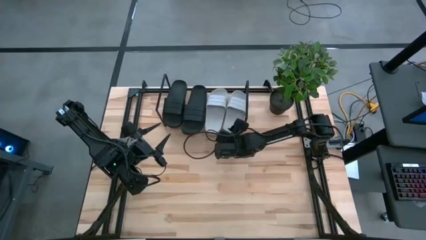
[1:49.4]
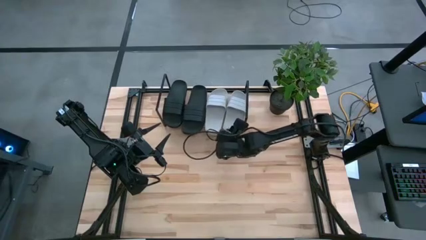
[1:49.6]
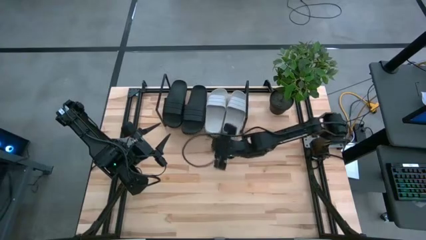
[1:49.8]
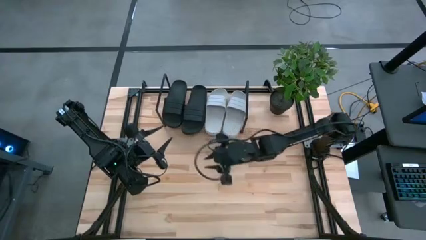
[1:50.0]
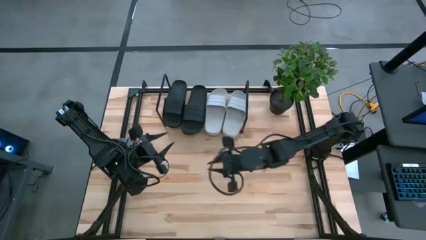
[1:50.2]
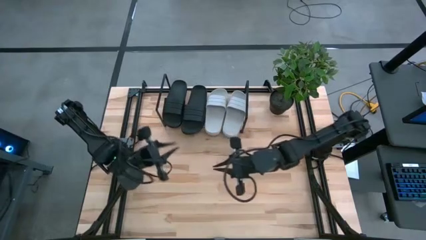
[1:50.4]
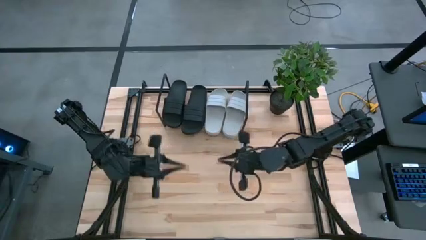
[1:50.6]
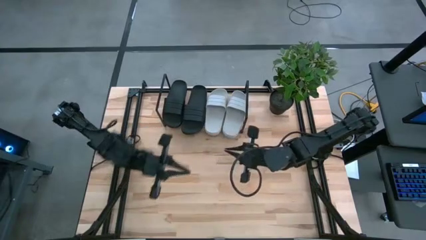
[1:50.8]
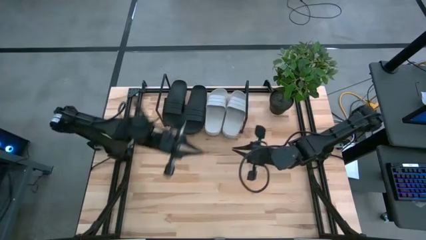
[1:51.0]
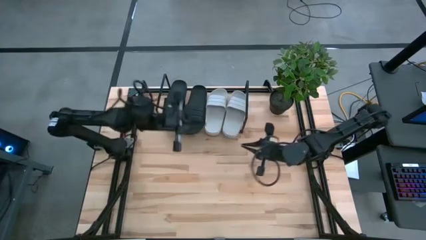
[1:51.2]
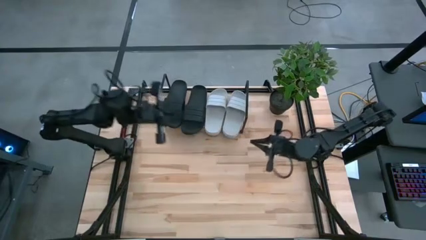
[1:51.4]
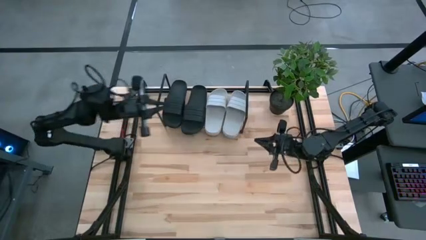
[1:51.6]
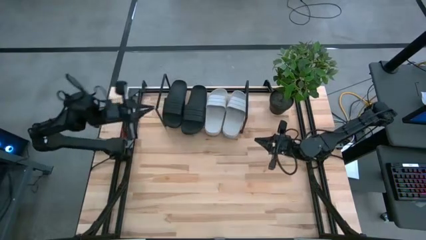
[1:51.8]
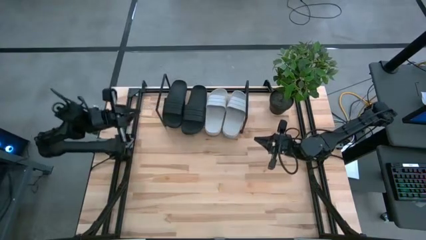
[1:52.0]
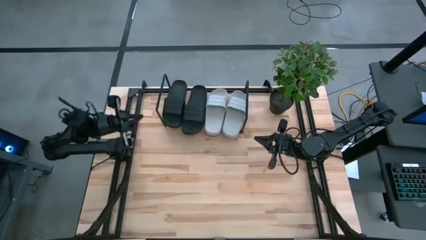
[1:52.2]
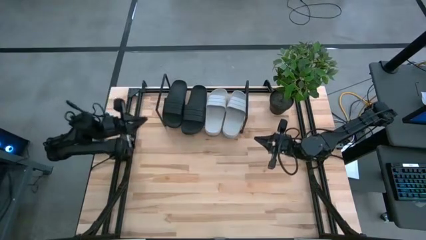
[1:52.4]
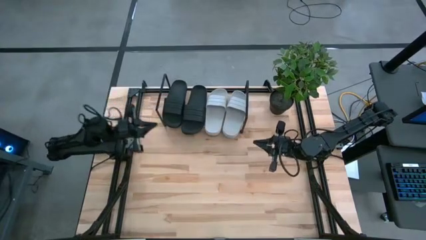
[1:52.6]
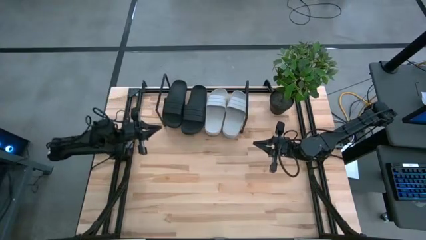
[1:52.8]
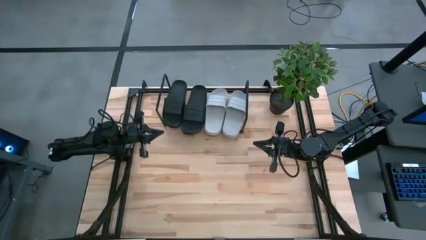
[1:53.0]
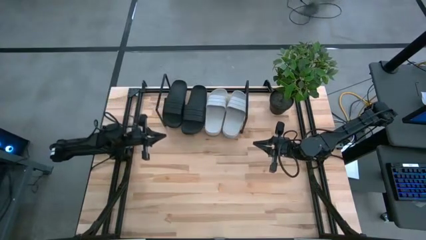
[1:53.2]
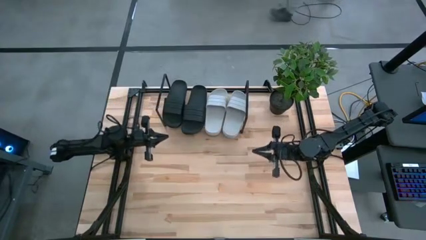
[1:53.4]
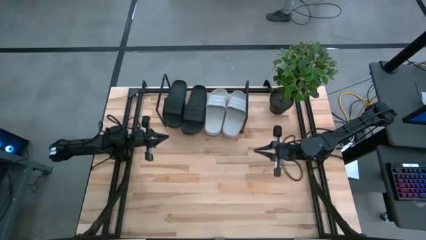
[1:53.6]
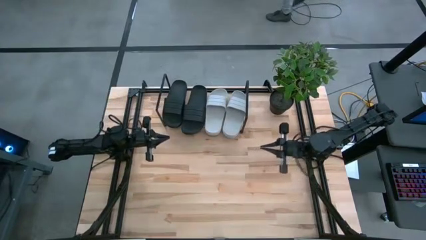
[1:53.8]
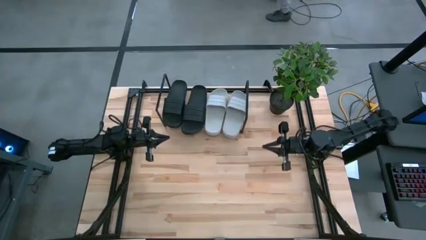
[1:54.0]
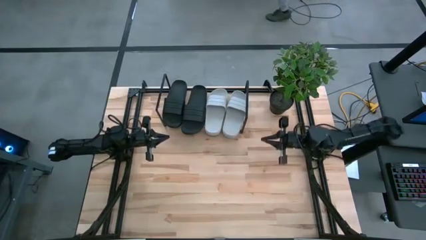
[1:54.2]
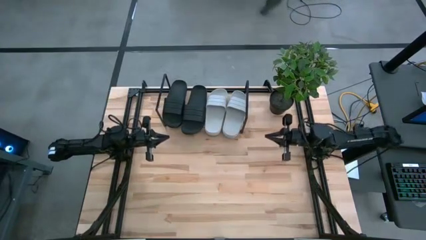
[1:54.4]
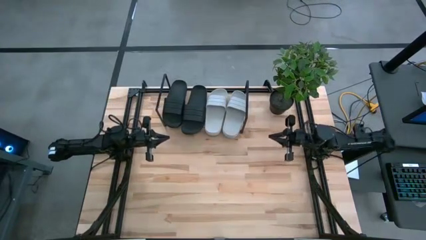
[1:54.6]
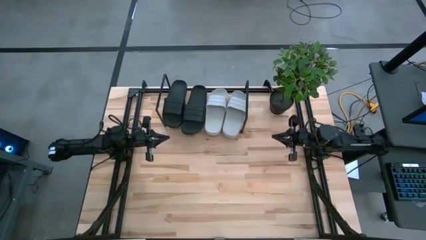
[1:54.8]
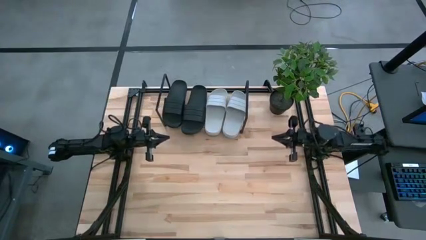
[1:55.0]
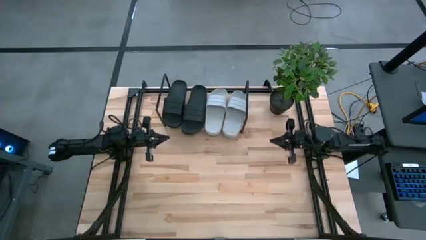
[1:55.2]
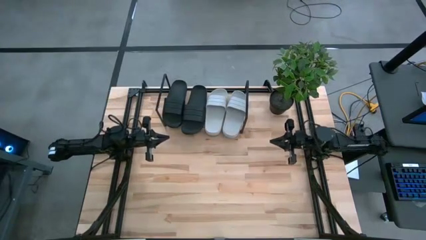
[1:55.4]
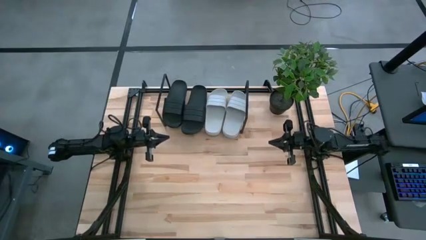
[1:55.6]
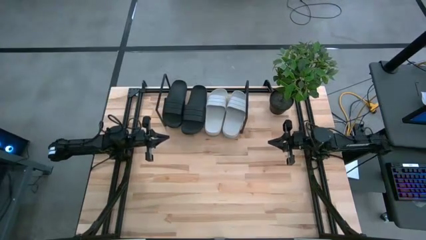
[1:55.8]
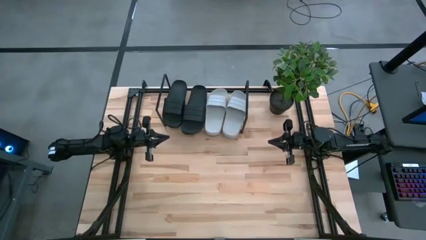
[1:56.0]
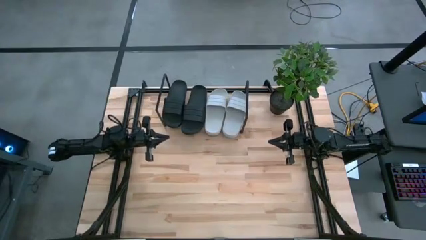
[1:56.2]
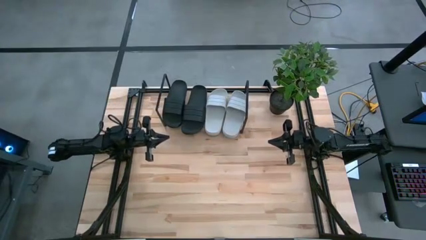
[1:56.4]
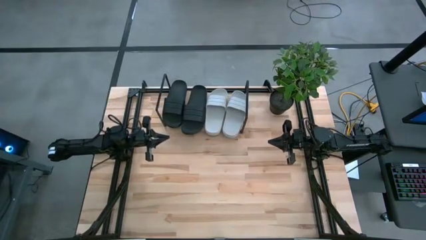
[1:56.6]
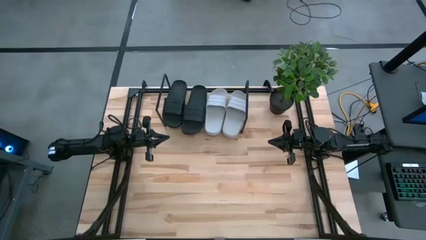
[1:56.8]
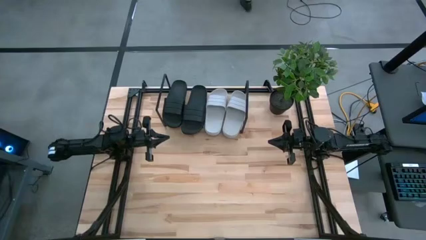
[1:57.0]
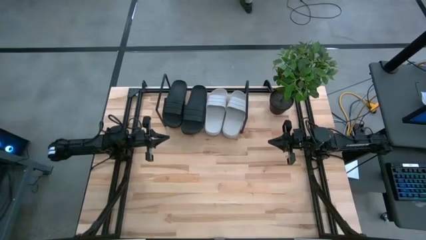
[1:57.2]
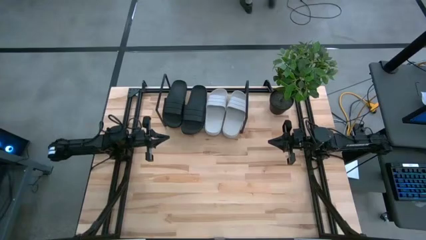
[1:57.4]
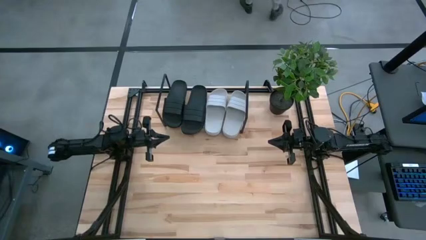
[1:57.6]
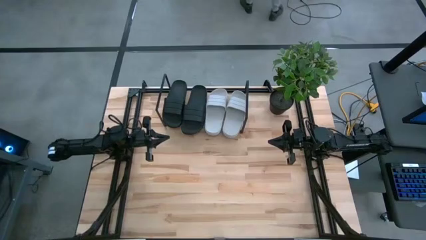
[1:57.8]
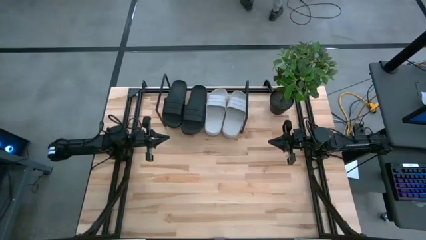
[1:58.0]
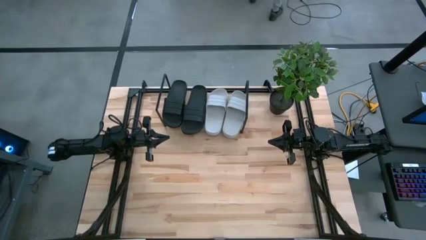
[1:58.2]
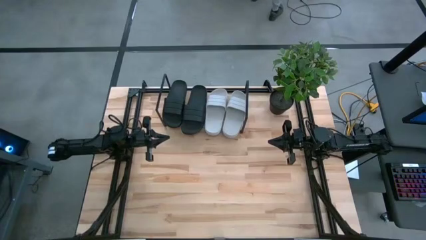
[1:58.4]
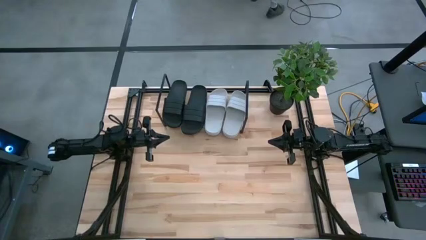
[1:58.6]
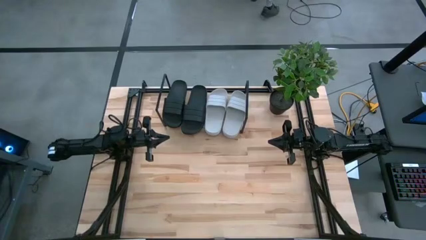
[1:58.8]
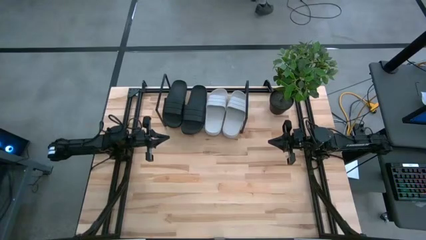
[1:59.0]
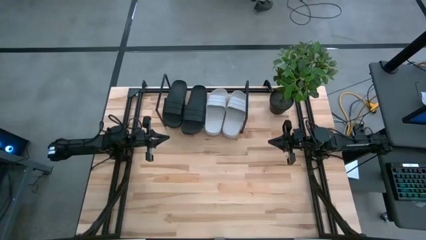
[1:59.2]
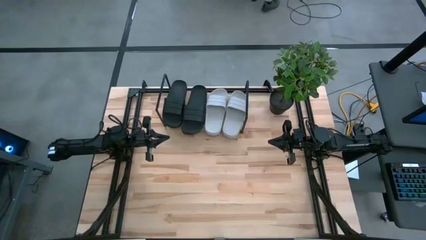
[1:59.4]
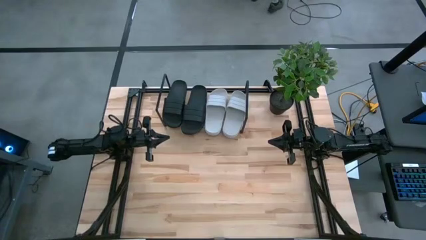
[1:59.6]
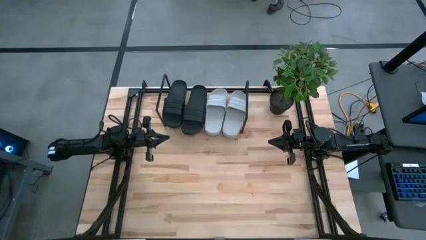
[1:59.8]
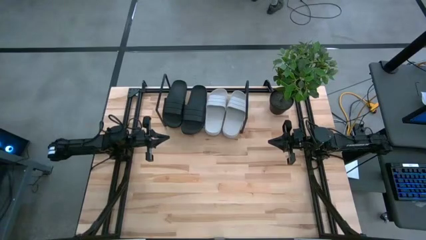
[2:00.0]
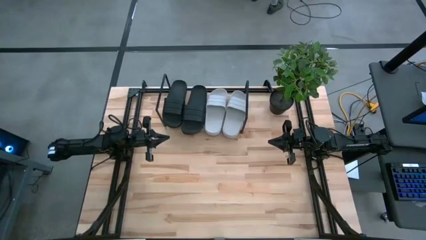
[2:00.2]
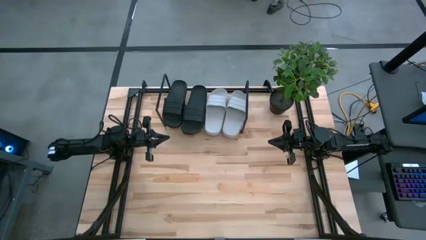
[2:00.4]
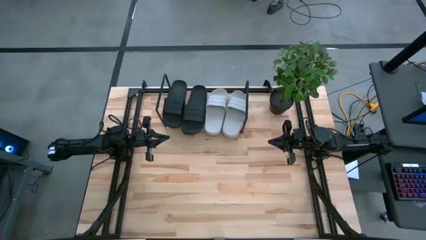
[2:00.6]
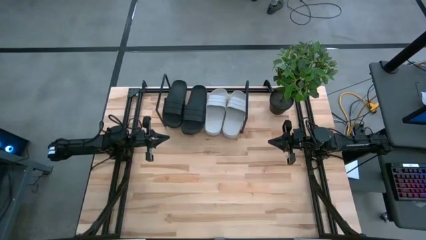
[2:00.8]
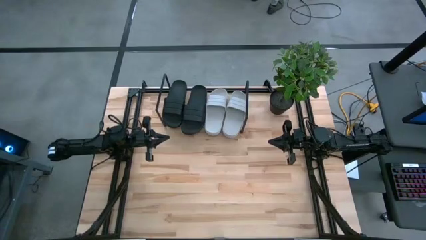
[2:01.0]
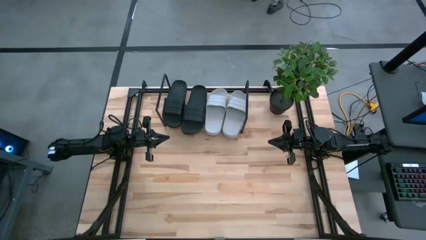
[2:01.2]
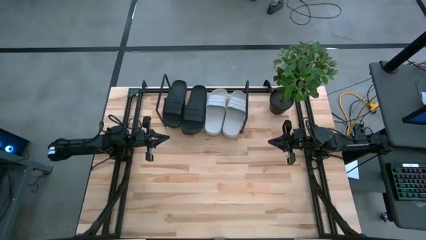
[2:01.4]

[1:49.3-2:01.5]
Task: Pick and place slides into the shelf
Return to Home Position

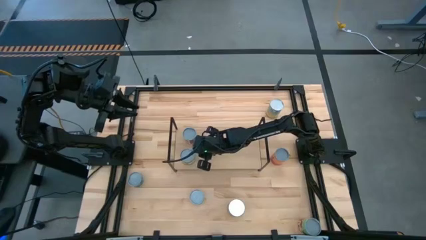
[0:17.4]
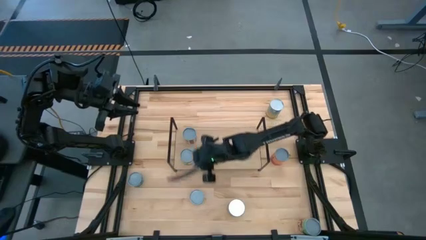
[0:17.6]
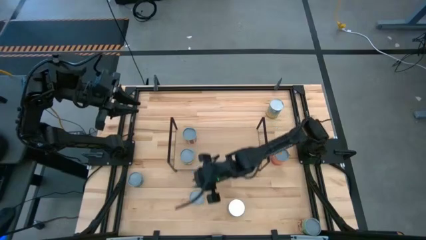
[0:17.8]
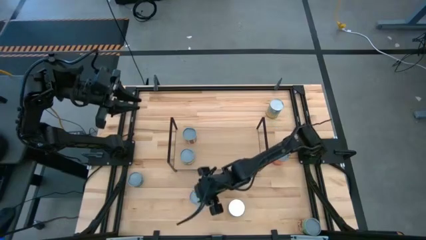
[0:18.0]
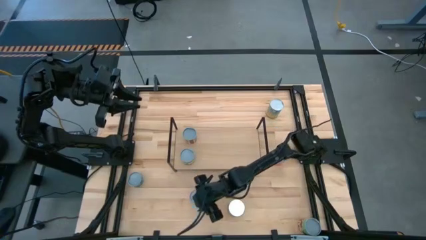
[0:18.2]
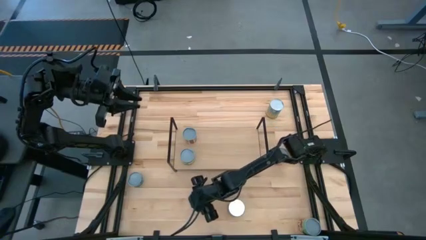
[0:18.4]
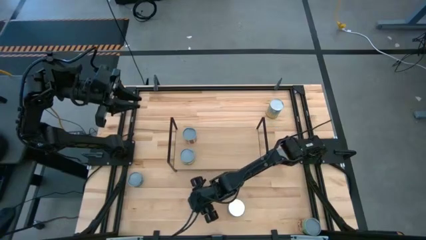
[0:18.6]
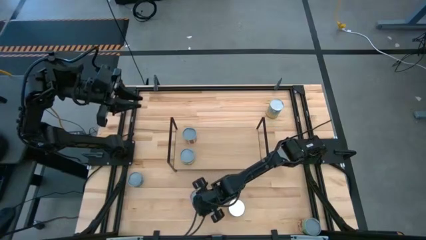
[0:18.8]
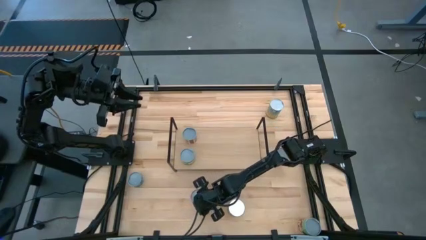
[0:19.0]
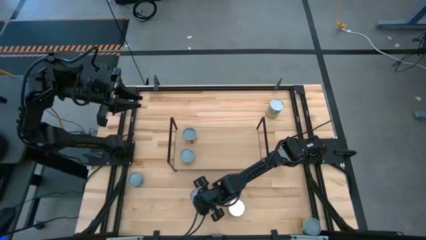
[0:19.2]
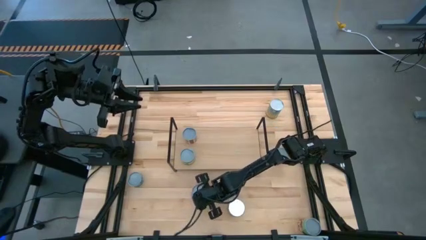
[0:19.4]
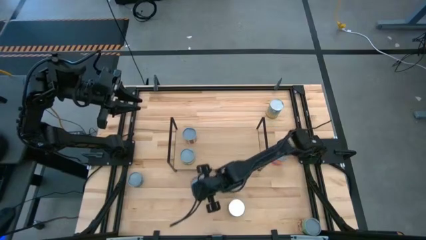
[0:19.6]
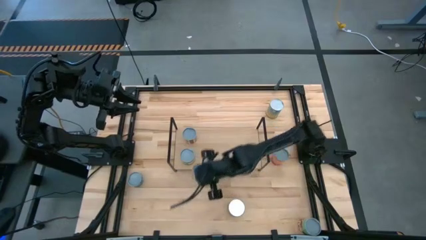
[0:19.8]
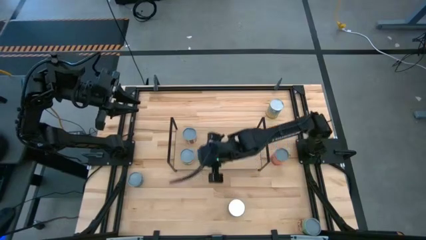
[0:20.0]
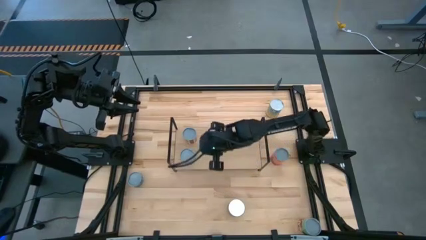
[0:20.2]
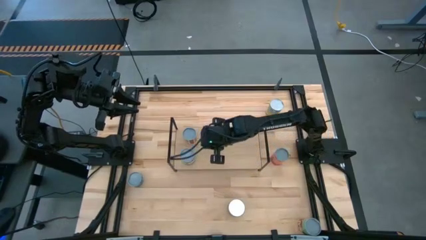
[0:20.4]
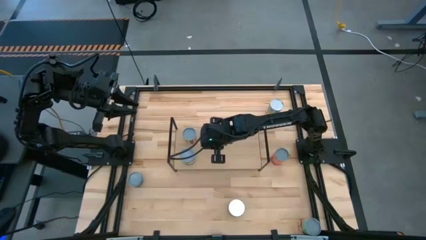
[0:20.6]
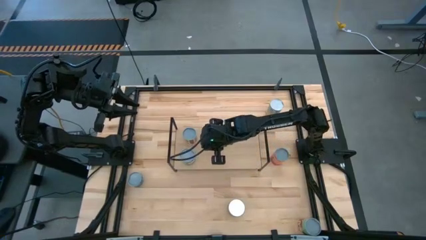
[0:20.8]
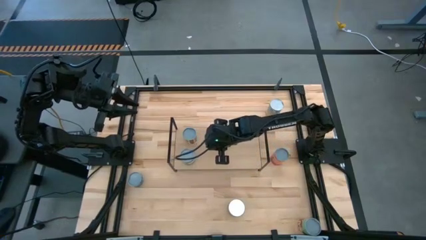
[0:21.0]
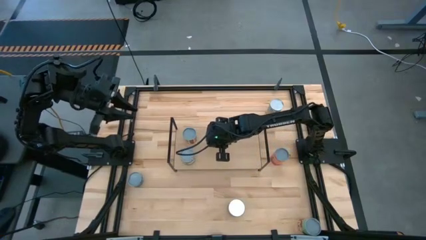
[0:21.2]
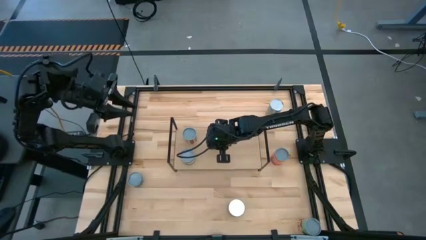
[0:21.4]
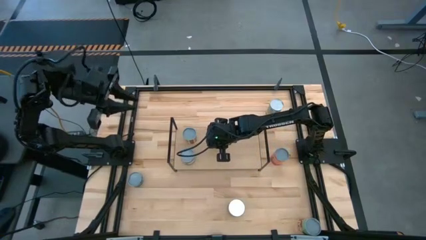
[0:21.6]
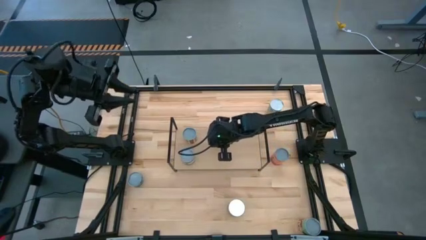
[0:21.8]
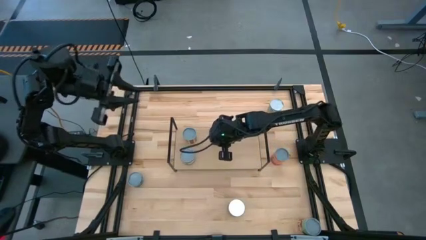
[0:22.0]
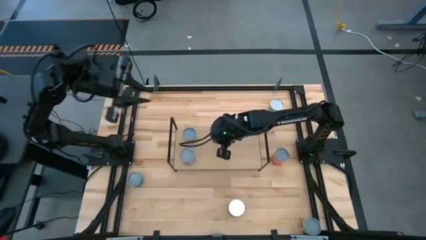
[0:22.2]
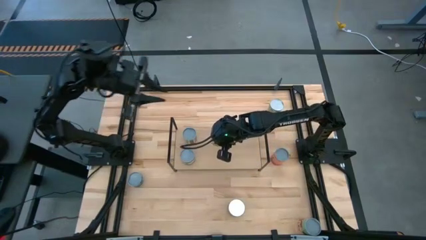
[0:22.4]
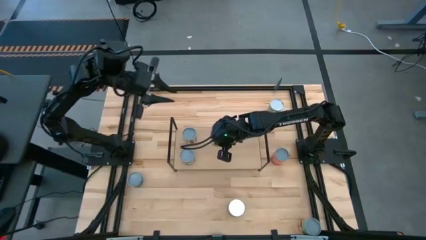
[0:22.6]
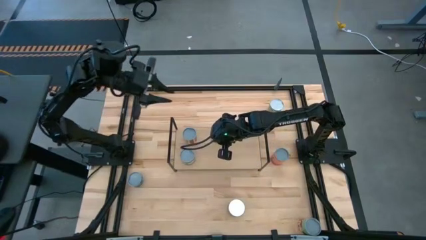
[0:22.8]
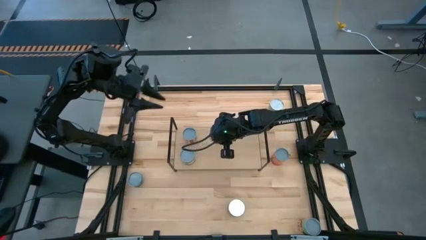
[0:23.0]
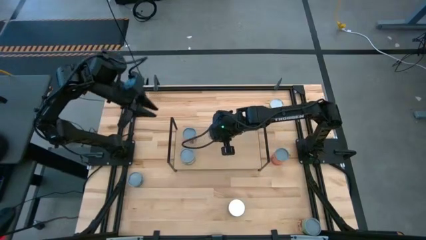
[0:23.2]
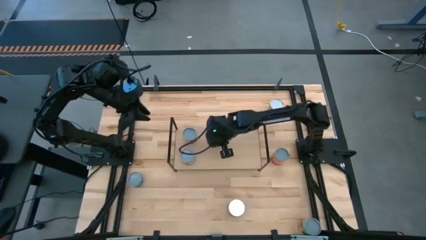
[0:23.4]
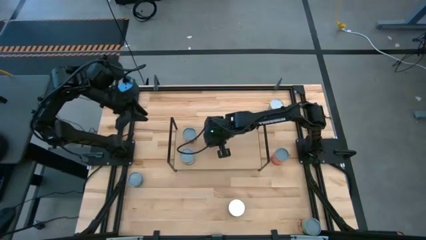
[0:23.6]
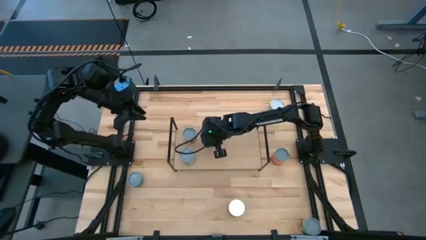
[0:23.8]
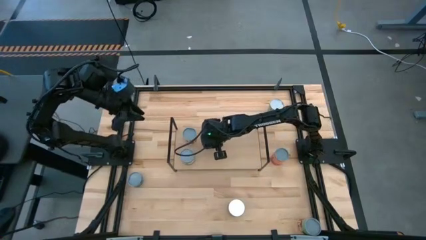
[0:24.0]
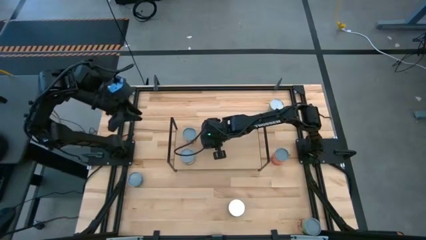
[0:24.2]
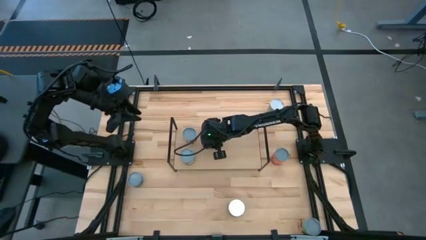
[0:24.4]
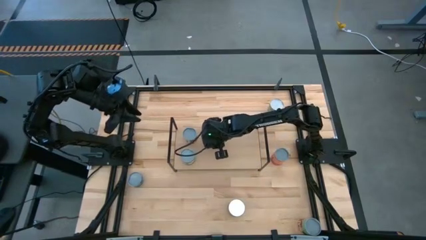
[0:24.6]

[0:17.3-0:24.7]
Task: Pick and place cans onto a shelf
Put the canned mushroom on the shelf
